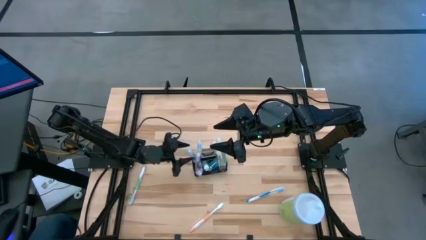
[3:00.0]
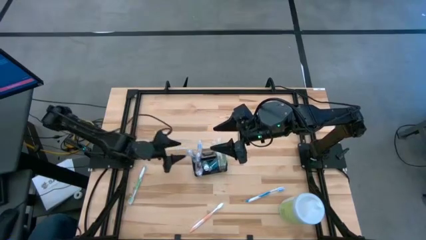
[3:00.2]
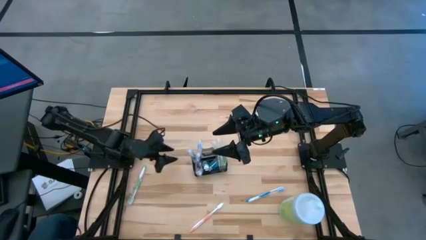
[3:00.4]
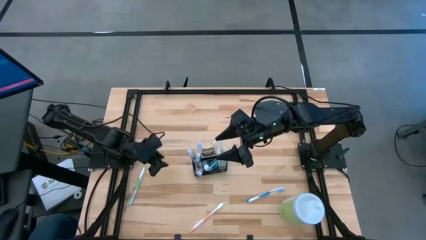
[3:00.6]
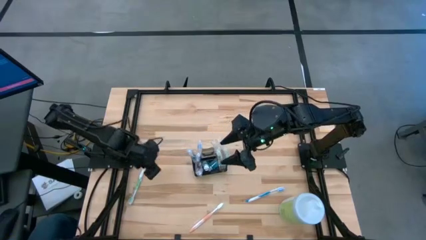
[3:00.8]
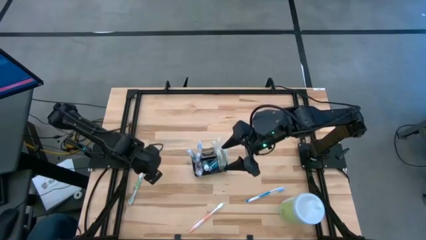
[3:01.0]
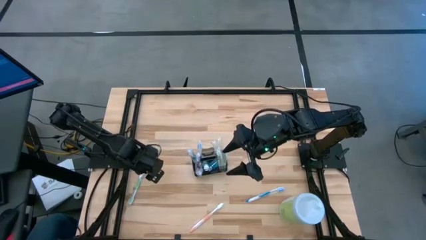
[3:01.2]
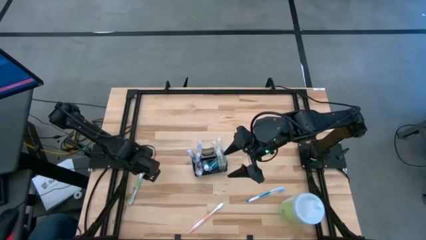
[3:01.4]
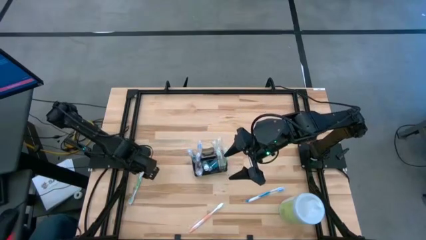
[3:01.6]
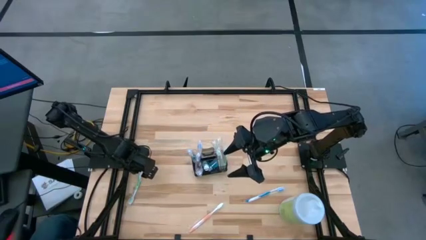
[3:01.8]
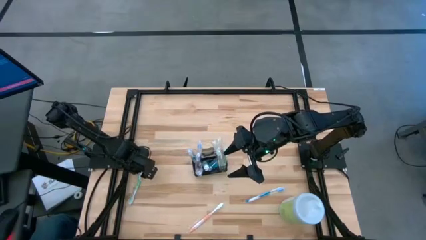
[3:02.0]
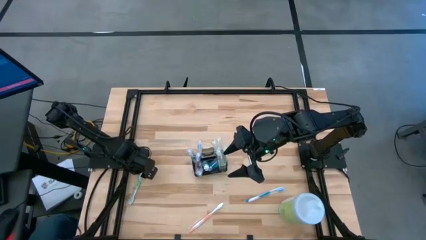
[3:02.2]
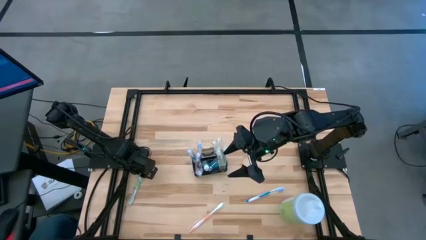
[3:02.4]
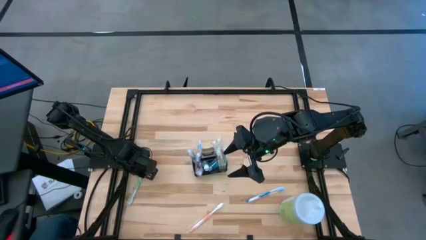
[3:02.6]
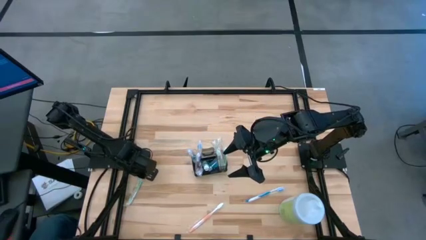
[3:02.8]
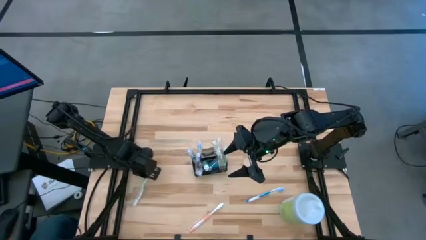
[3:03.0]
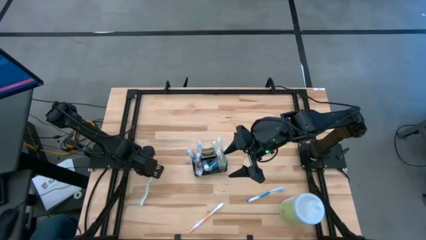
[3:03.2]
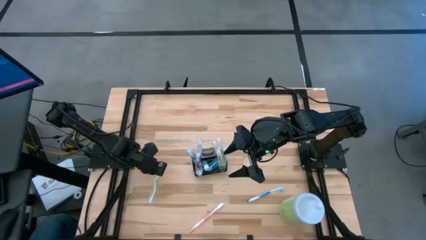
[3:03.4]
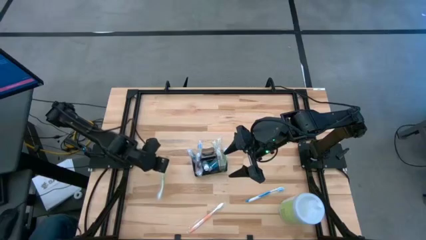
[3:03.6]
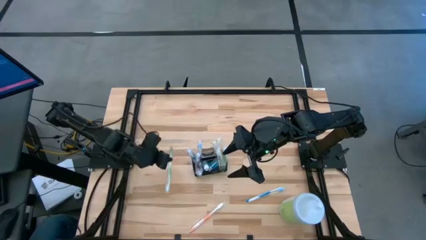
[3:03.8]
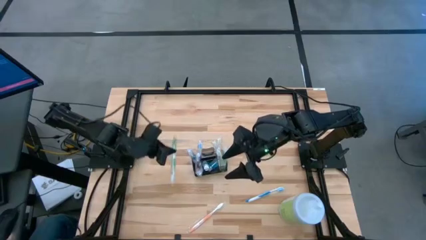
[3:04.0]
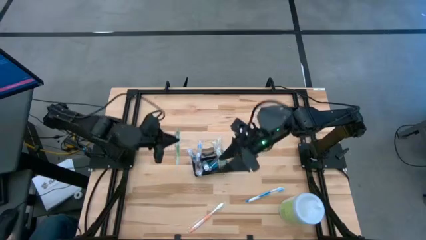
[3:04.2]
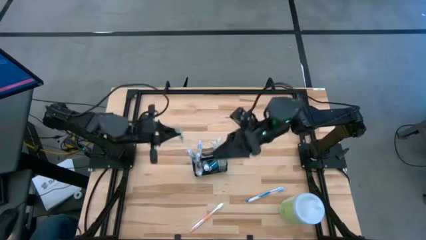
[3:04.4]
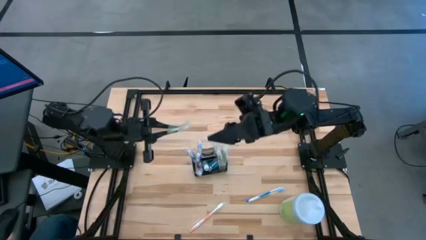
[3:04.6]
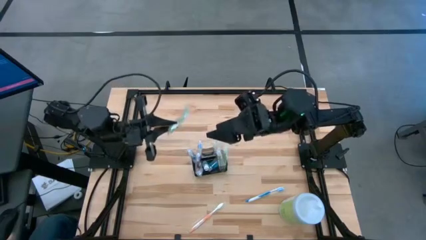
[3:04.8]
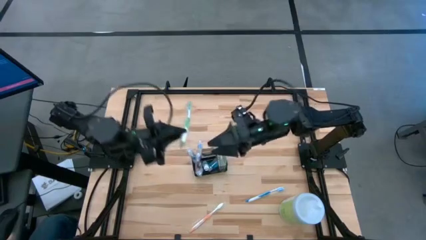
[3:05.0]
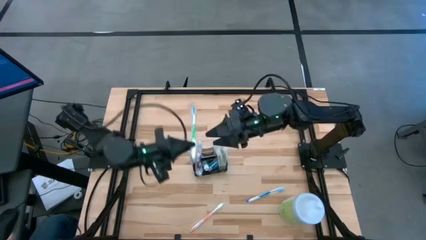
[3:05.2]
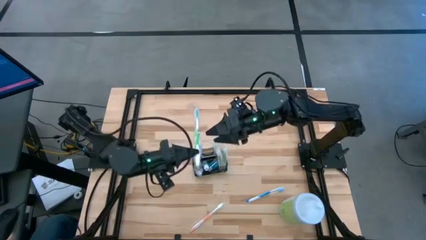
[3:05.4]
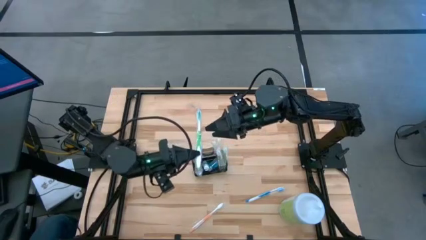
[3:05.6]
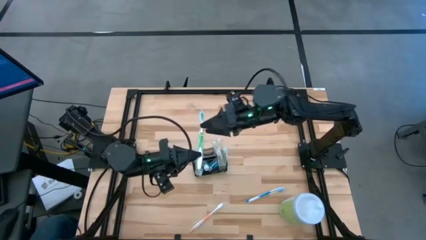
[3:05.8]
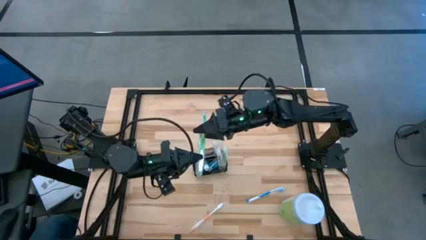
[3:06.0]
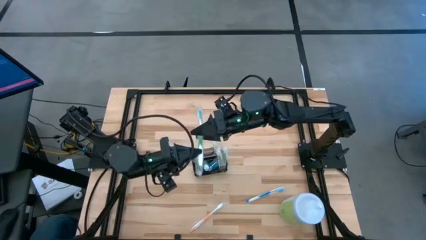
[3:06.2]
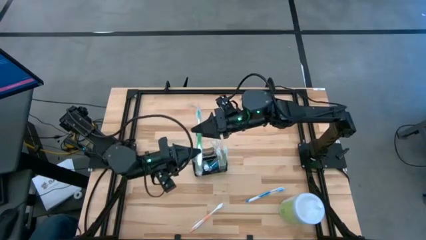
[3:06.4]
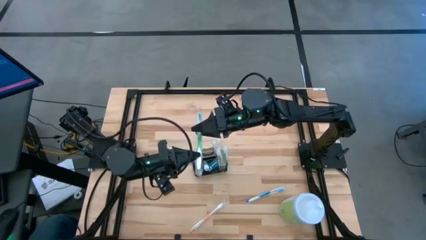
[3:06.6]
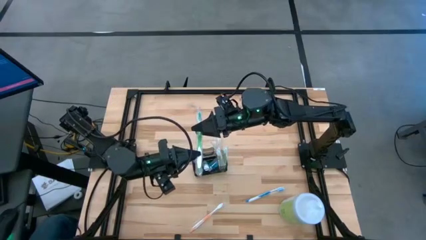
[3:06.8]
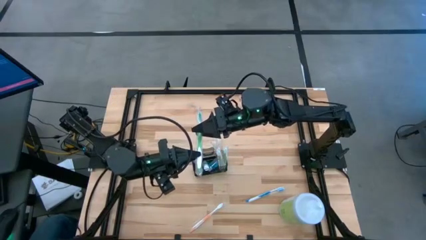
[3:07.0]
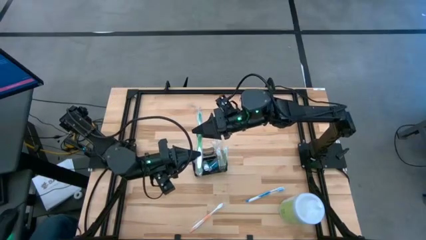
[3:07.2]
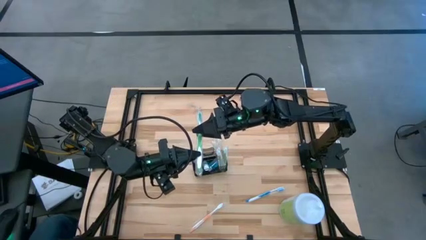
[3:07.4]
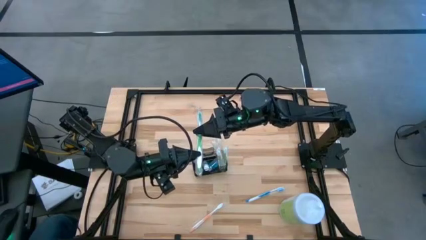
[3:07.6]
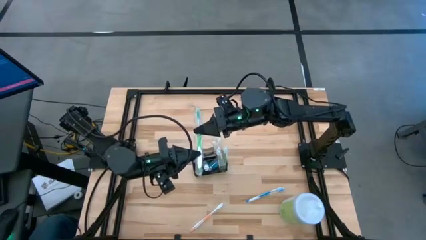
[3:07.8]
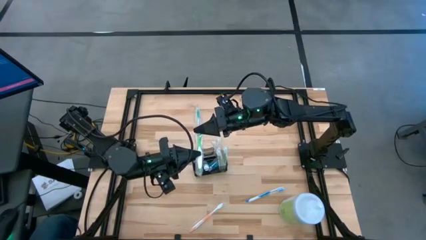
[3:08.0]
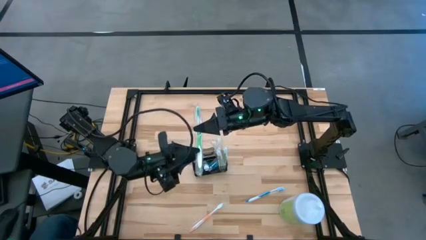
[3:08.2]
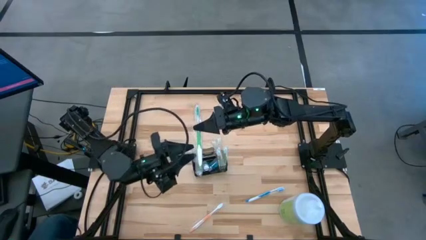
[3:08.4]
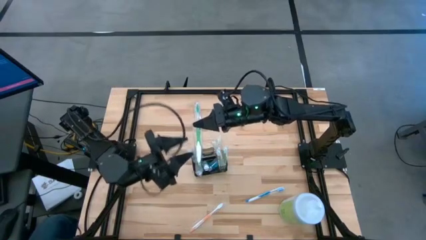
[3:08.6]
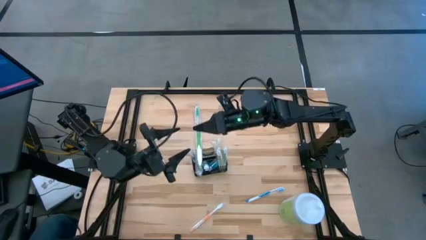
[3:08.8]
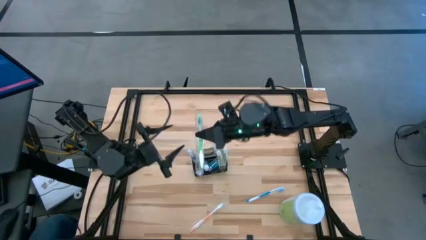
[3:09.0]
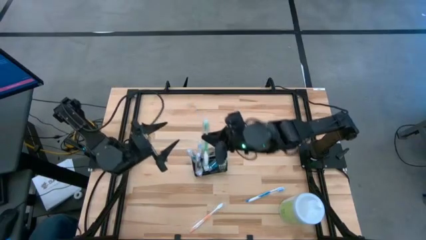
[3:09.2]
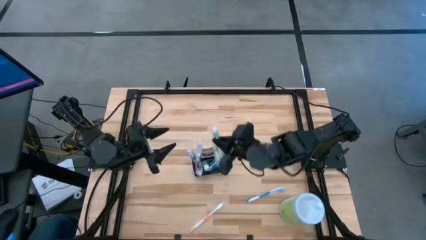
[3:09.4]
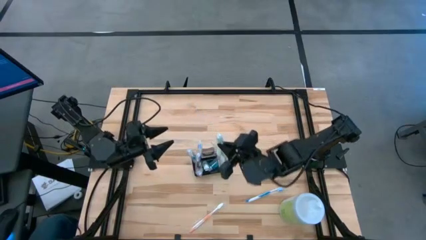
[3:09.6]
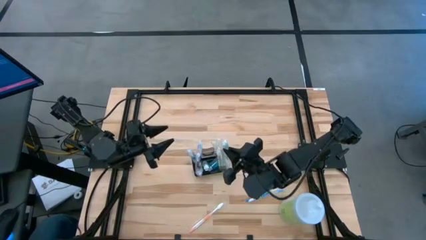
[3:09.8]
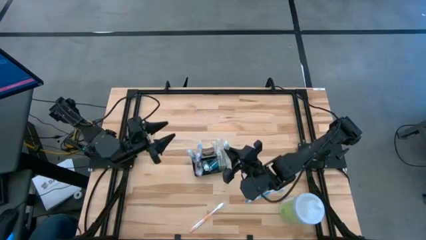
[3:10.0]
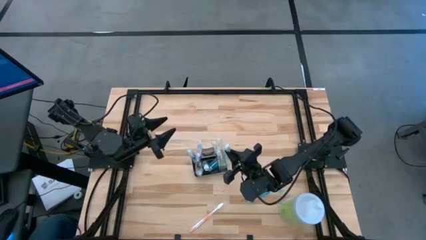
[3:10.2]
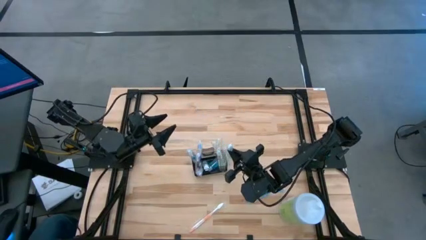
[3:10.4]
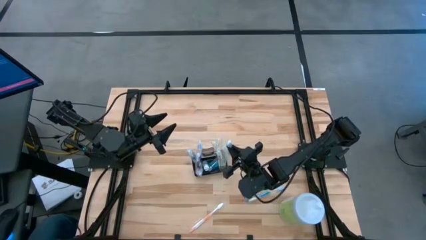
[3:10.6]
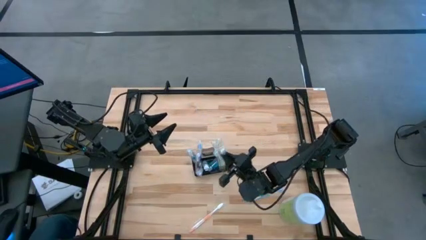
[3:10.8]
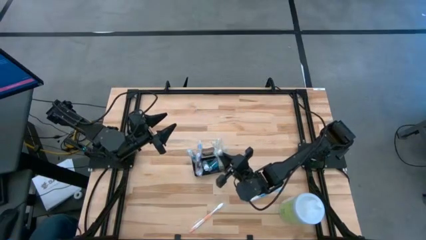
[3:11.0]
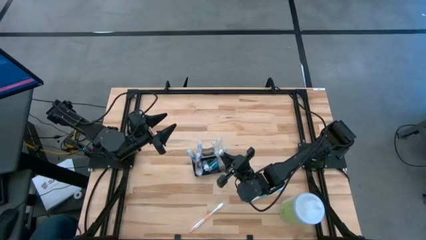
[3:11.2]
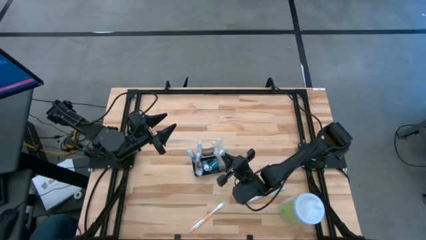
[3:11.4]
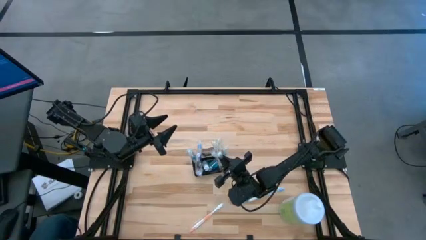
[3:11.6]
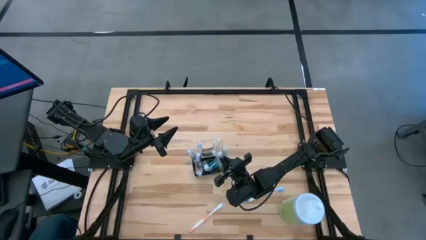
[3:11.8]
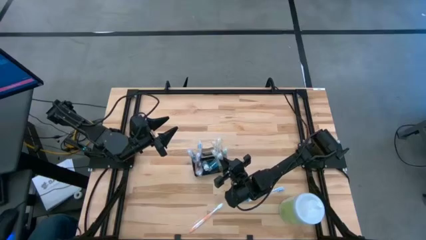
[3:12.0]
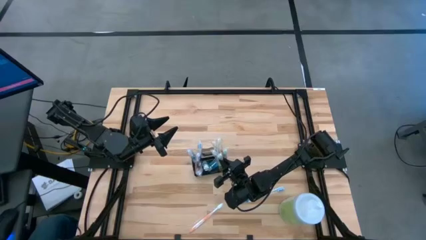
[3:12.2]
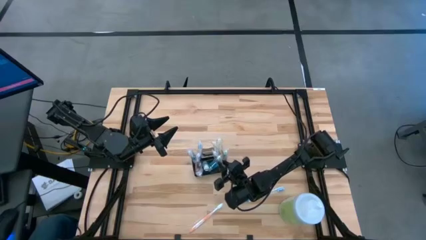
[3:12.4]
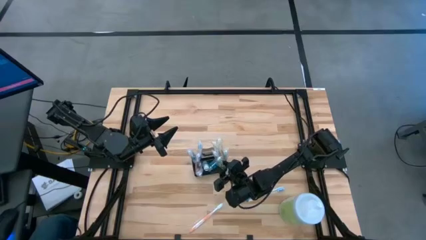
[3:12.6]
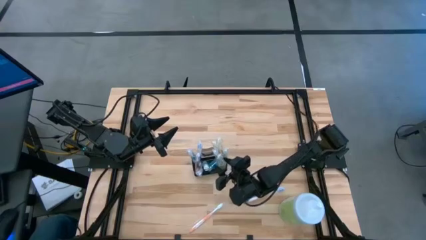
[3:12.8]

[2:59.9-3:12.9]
Task: Pick & Place toothbrushing station
Put the green toothbrush into the bottom right section of the mesh organizer

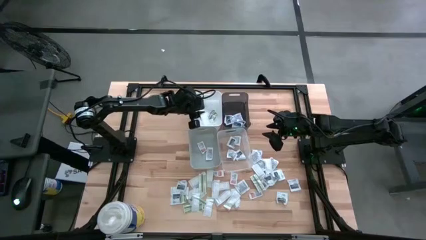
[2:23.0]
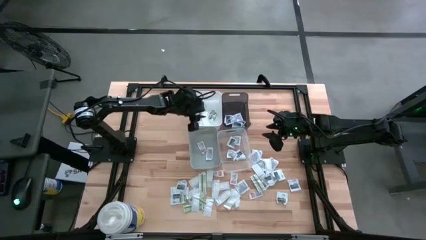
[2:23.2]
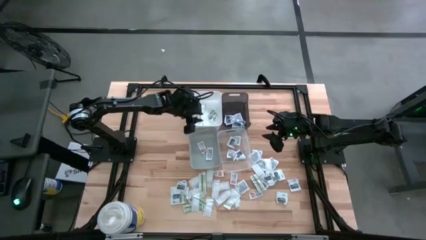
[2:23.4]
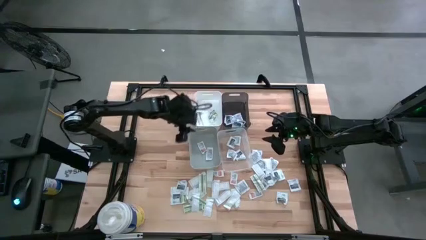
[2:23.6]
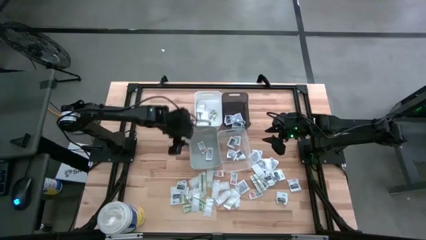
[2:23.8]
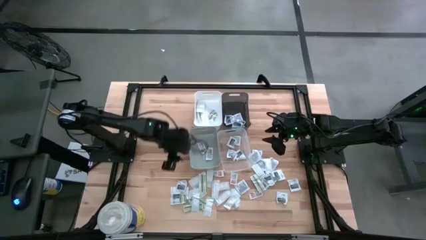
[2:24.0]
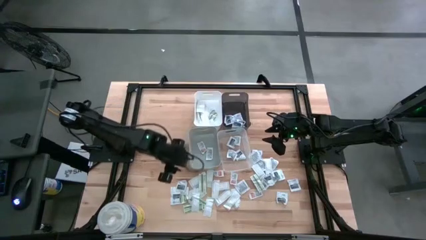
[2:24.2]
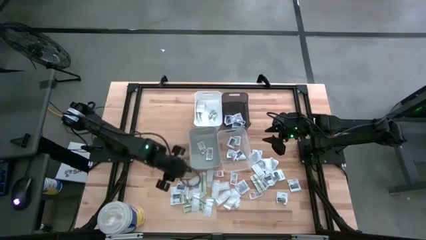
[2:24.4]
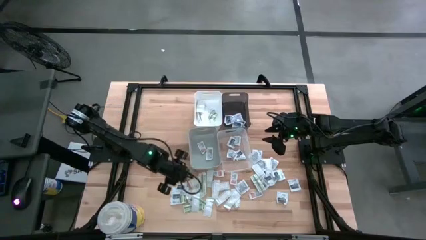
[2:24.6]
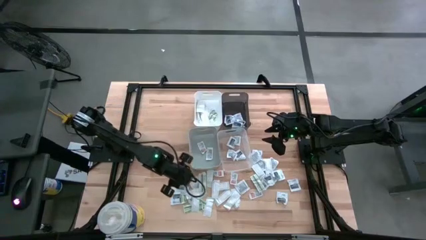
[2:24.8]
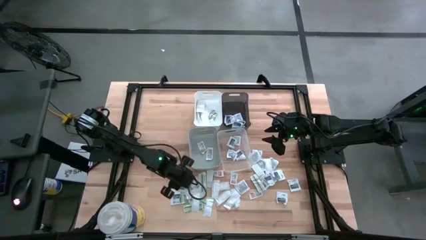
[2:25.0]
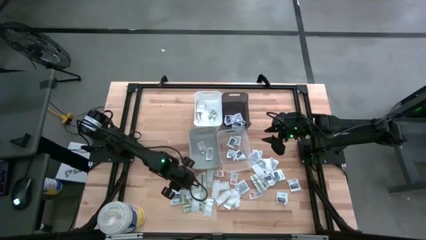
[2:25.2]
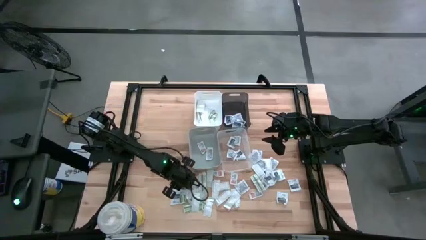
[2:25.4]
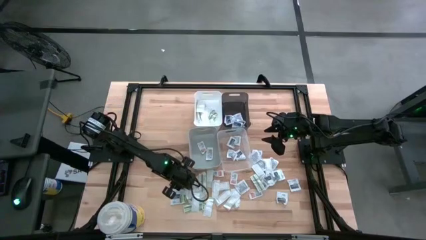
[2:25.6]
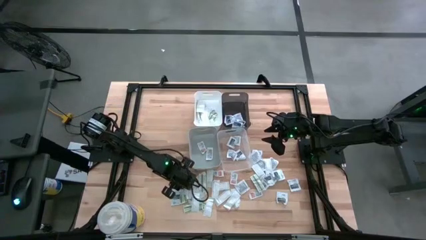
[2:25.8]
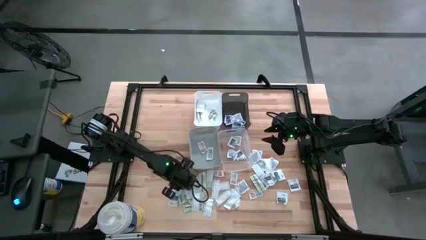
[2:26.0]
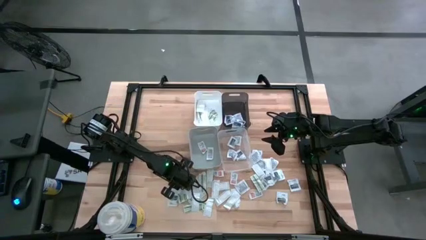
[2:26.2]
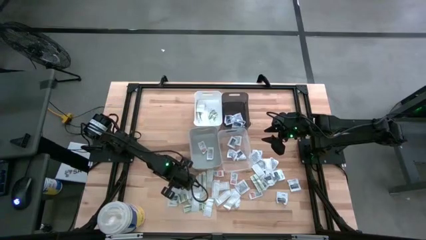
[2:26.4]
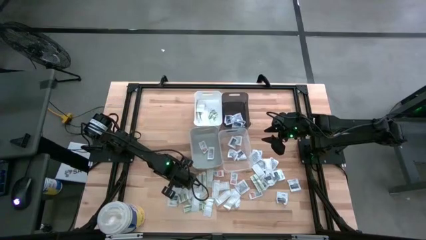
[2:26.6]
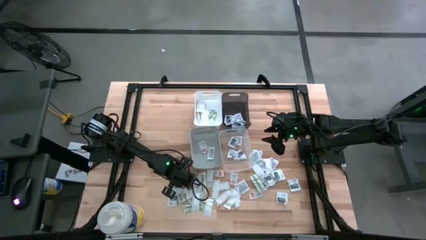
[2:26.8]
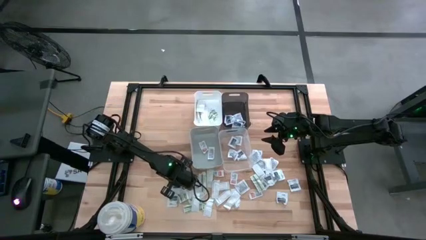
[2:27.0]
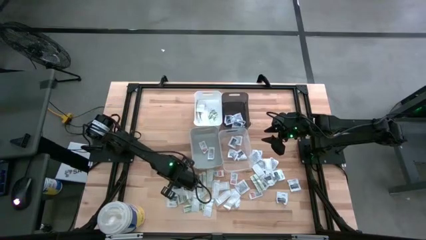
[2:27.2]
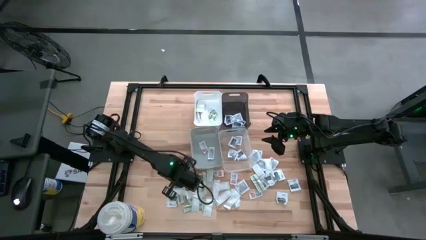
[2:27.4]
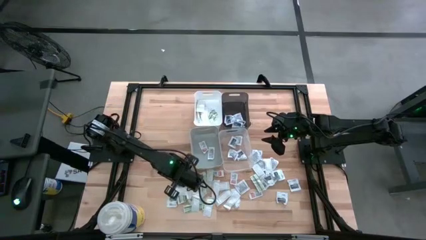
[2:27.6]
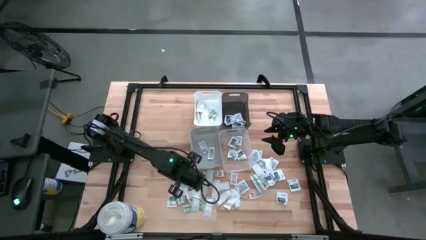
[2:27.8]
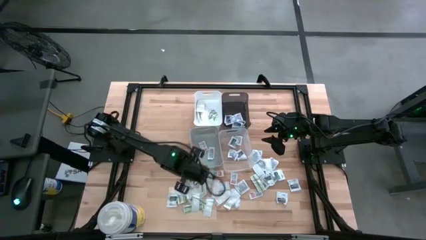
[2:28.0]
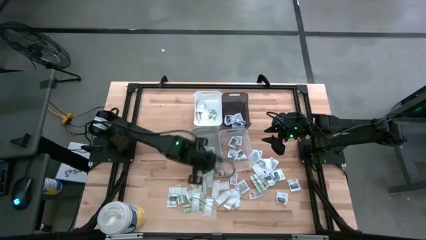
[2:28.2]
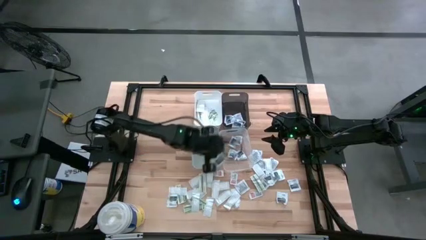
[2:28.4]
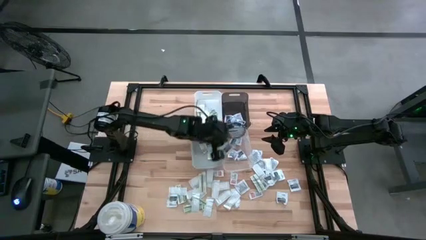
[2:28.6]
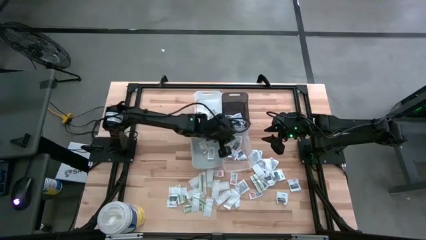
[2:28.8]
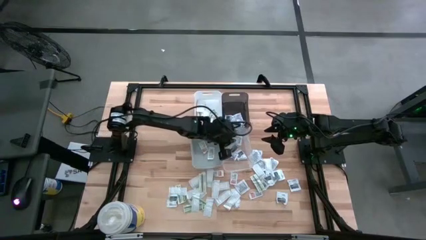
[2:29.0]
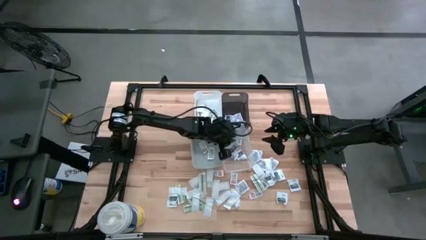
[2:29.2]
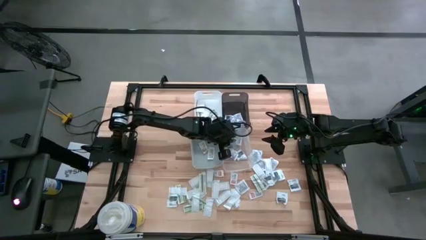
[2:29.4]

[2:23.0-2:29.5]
Task: Pick & Place First Aid Supplies
Put the gray towelette pack into the transparent bin
